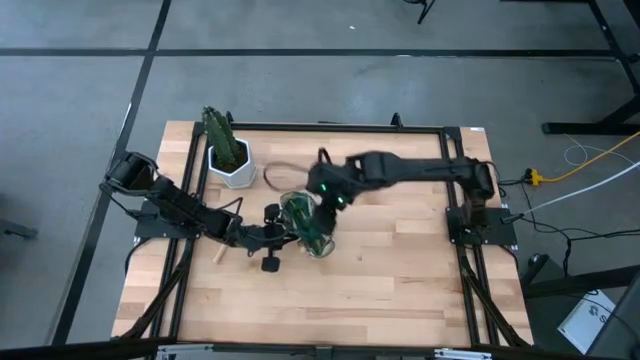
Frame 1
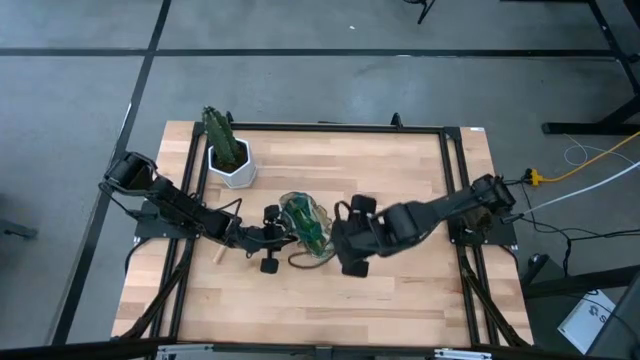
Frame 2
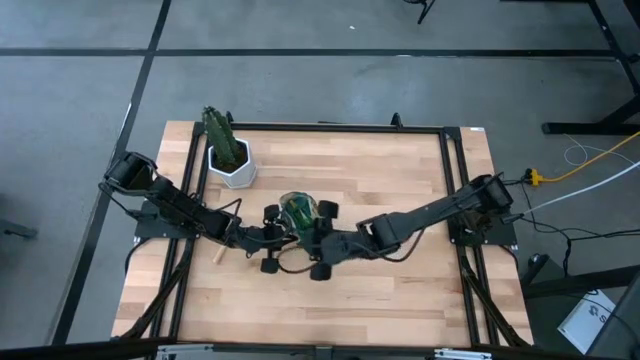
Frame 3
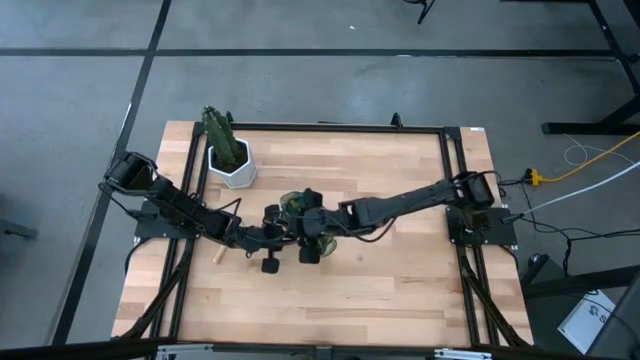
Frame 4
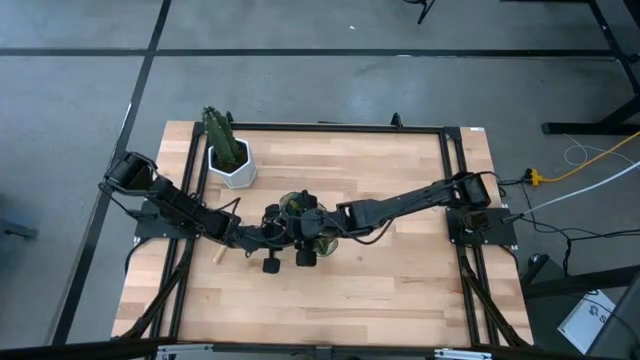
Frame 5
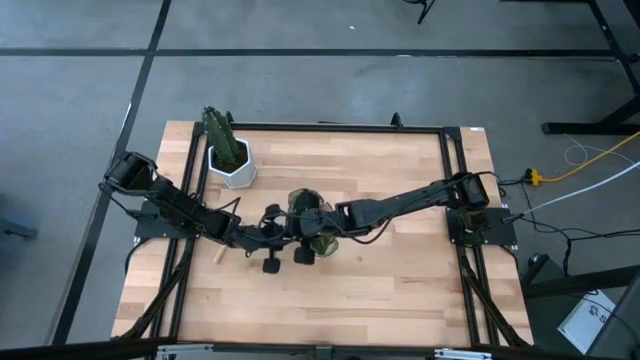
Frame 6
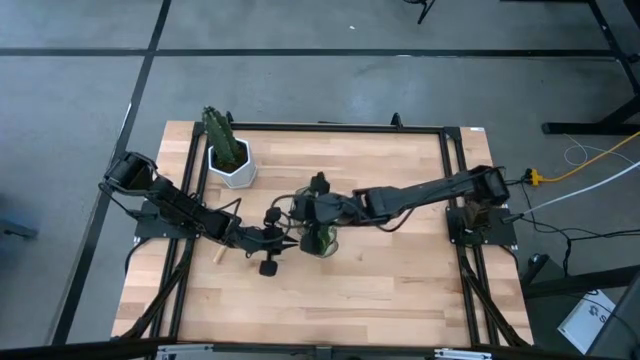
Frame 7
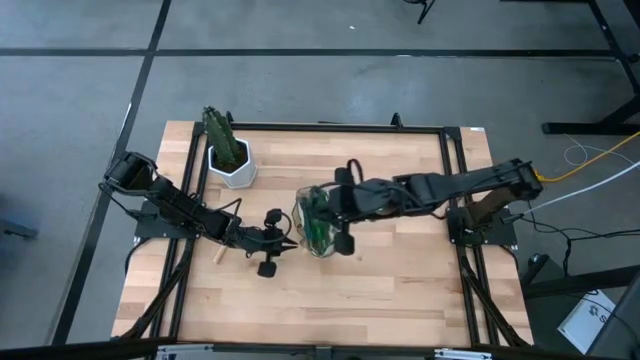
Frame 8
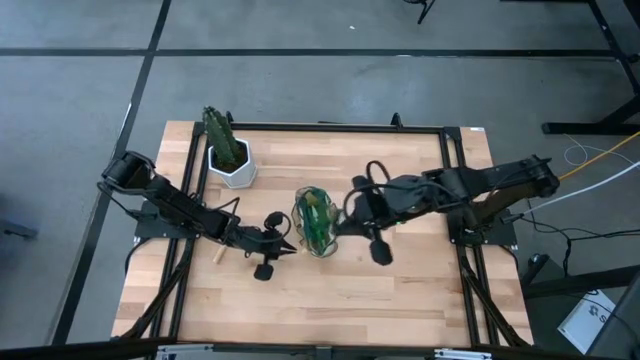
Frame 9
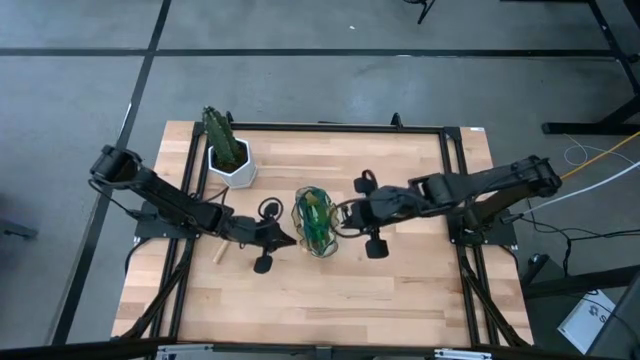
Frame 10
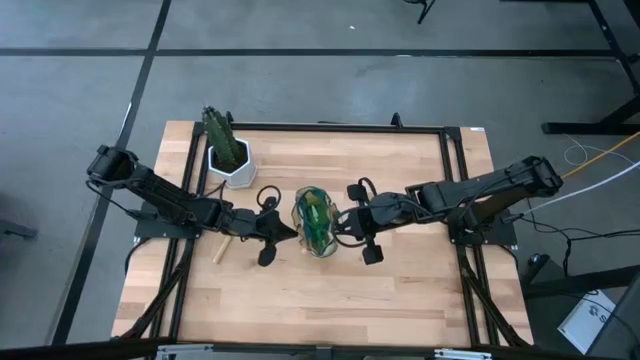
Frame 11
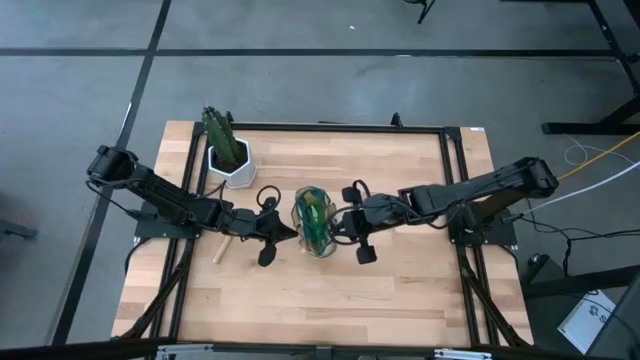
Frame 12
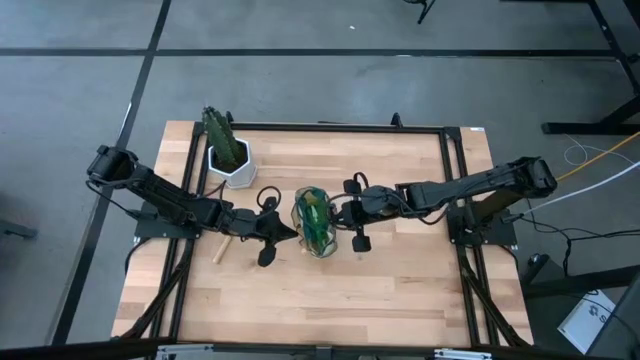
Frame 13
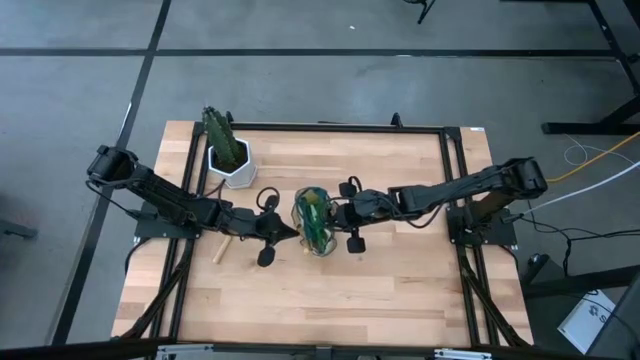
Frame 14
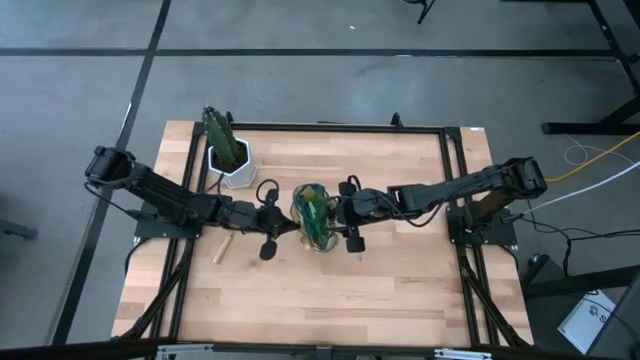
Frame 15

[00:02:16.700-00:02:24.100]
Task: Pick & Place Garden tools in Gardening bag
Put the fruit pruner into the gardening bag

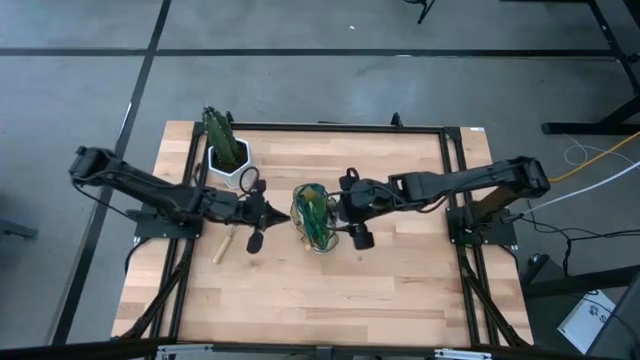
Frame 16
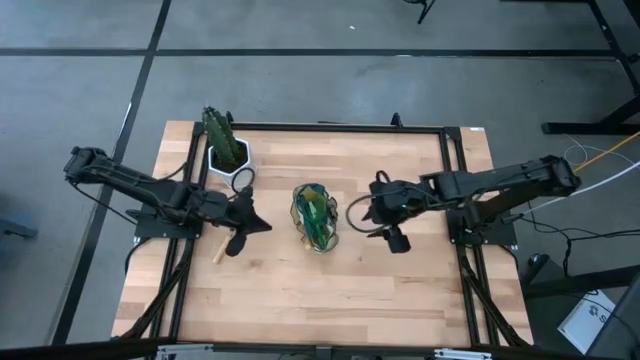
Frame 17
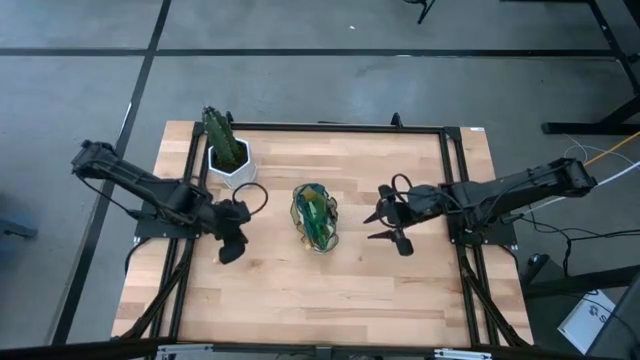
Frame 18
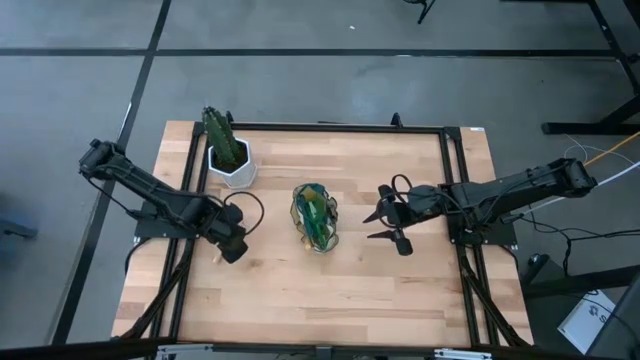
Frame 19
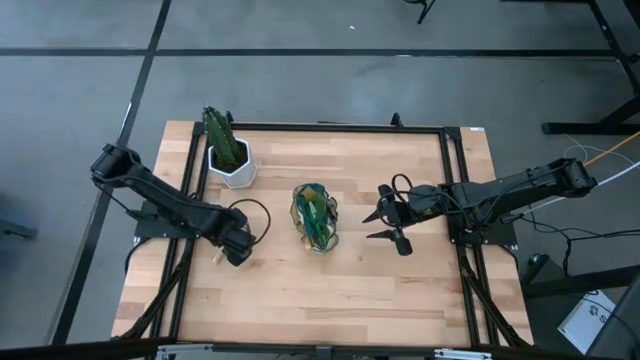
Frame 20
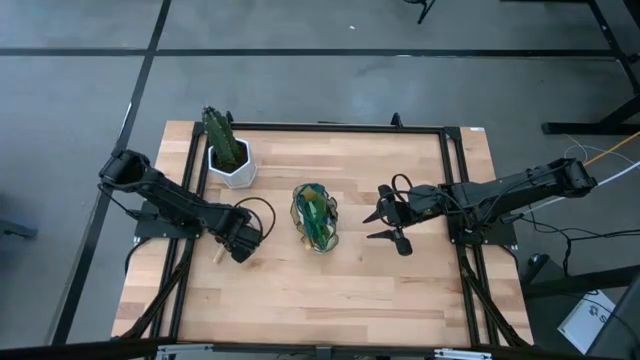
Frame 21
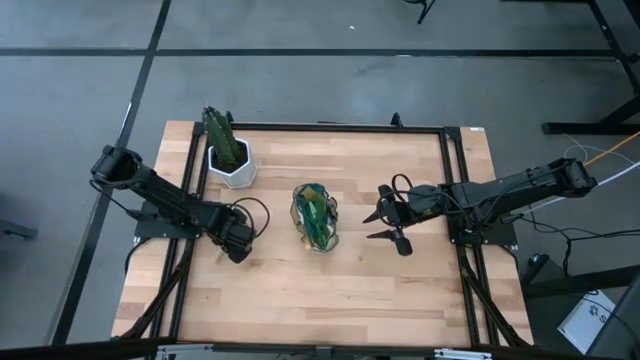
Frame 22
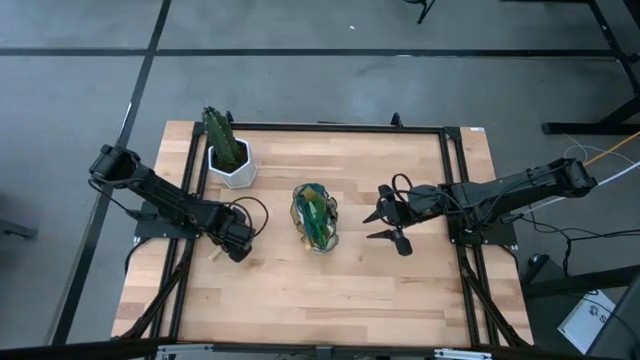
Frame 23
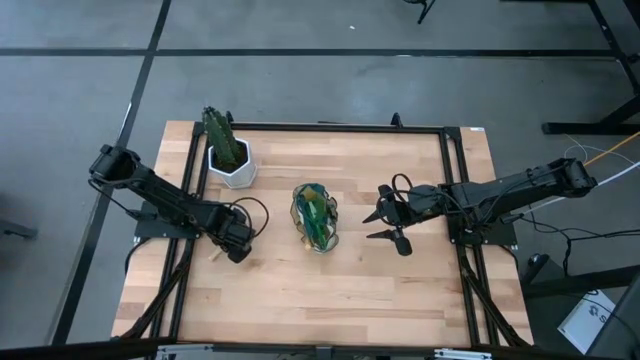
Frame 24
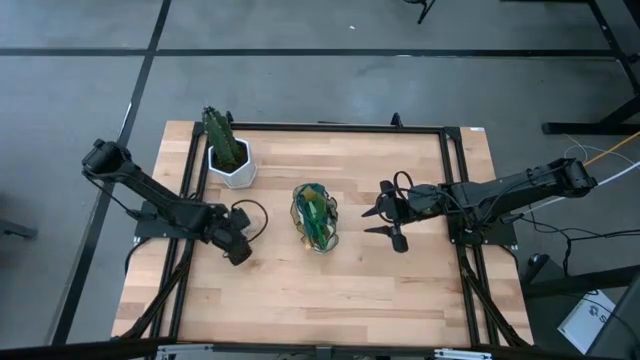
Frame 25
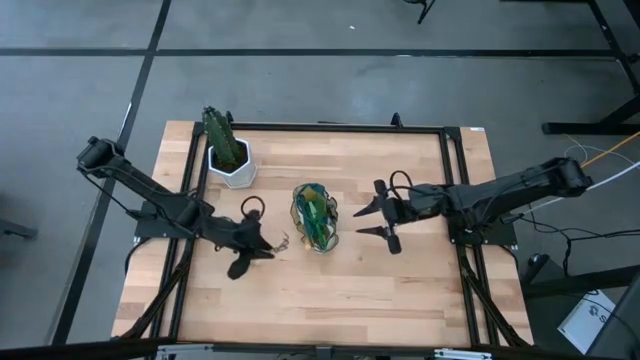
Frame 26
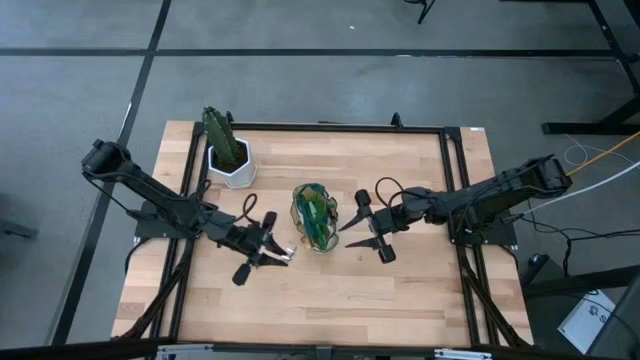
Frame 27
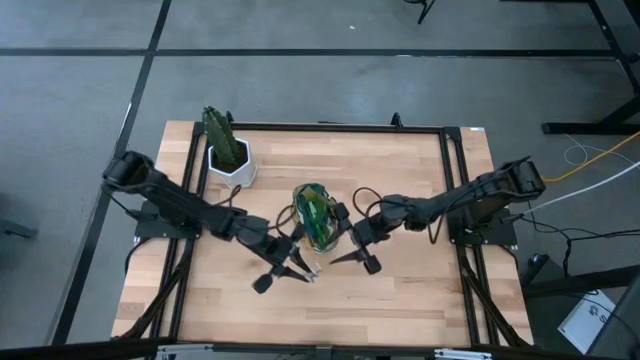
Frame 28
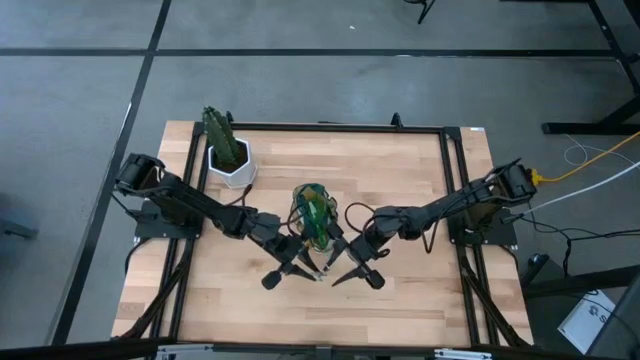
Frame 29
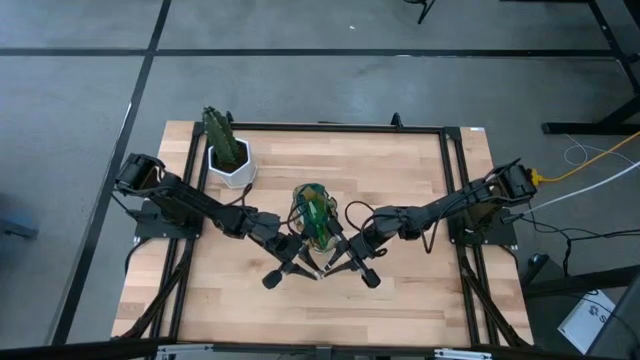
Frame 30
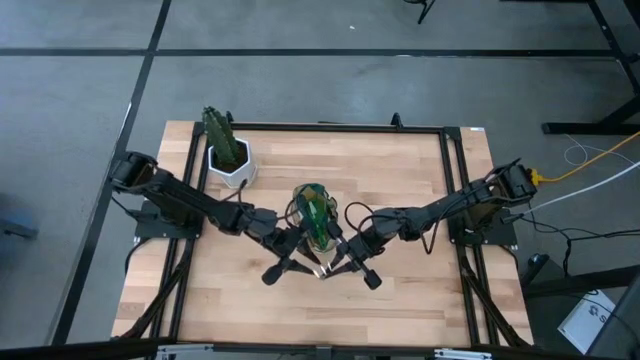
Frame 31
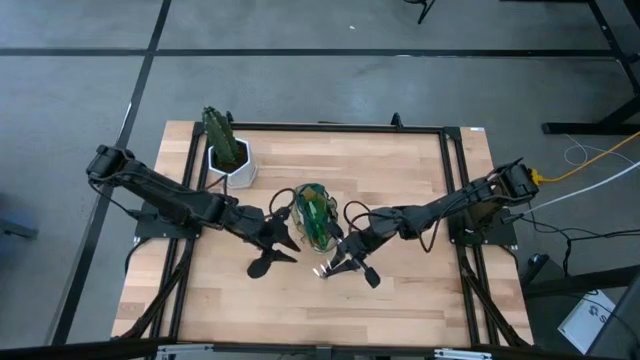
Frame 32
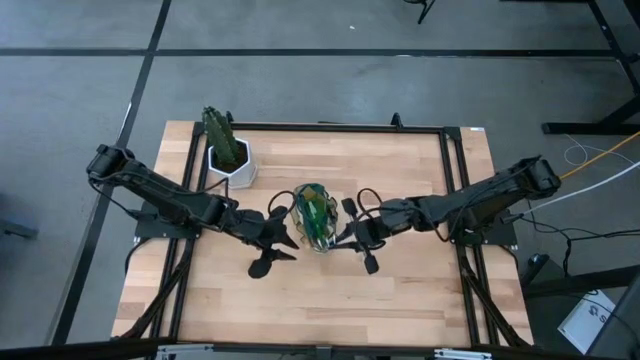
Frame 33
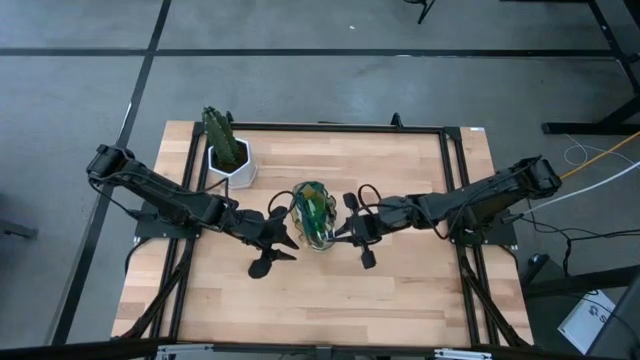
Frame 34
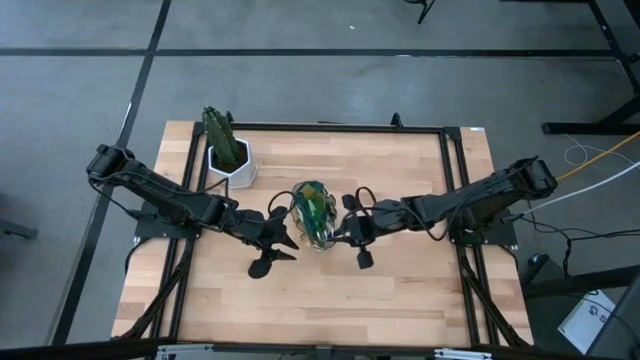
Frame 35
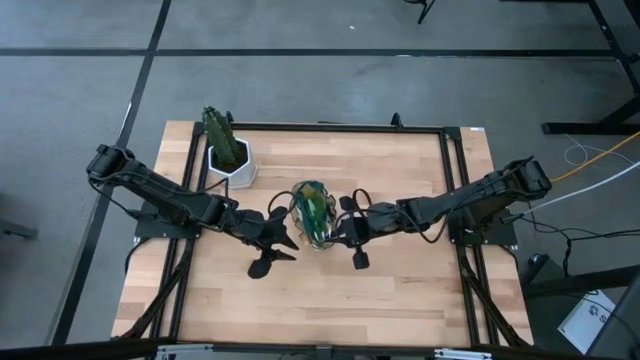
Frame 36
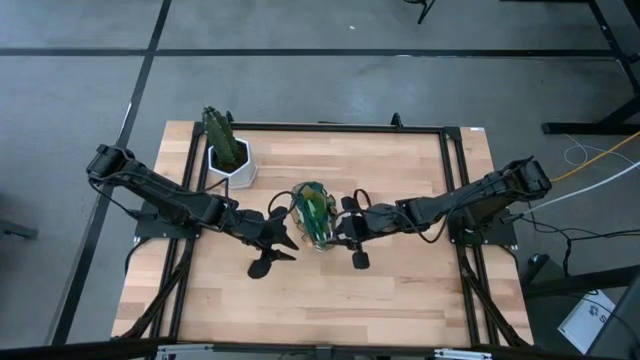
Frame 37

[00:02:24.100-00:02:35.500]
Put the hand rake into the gardening bag

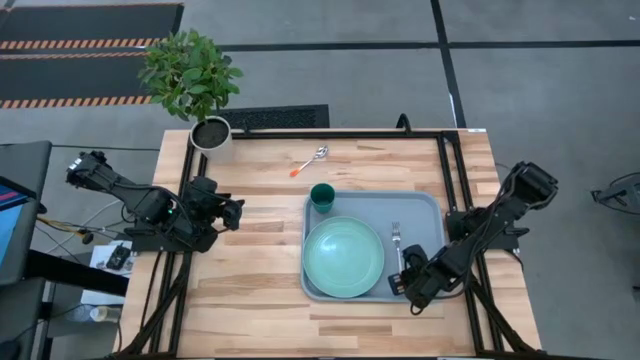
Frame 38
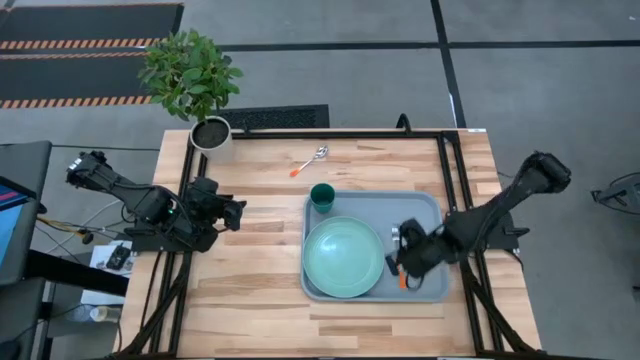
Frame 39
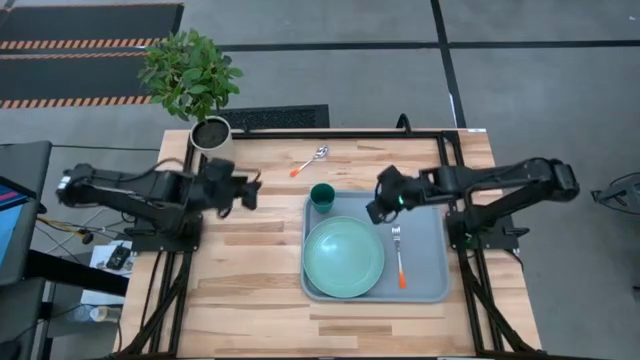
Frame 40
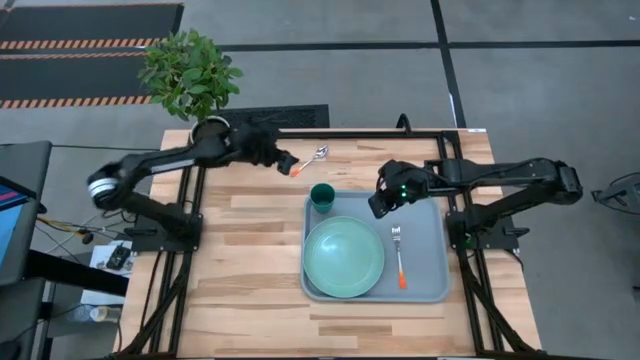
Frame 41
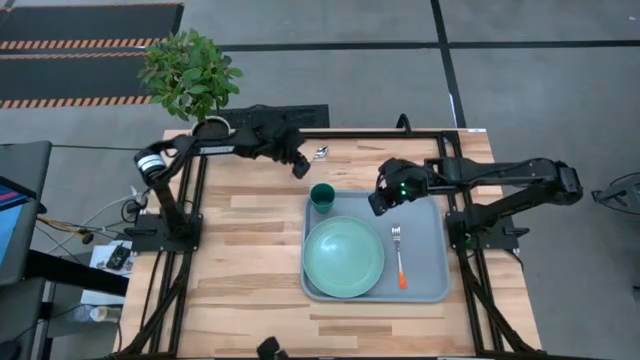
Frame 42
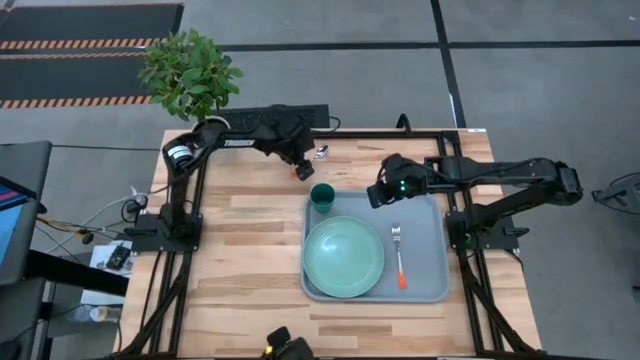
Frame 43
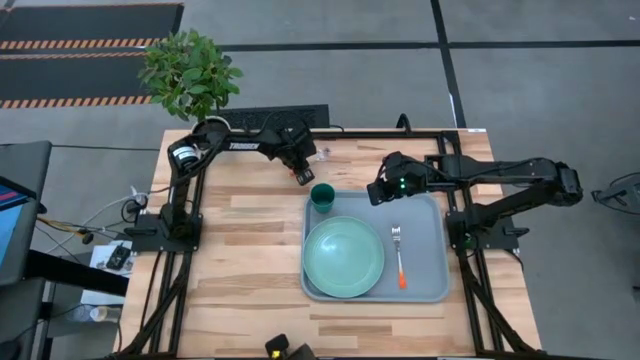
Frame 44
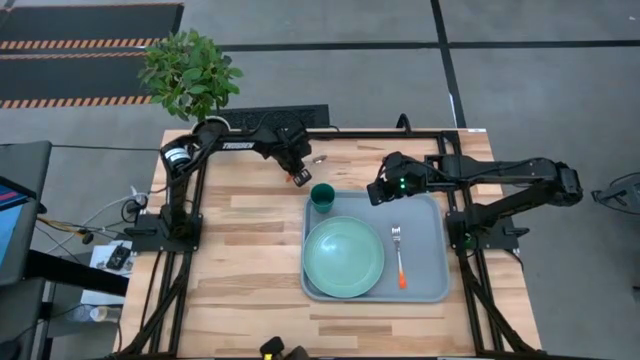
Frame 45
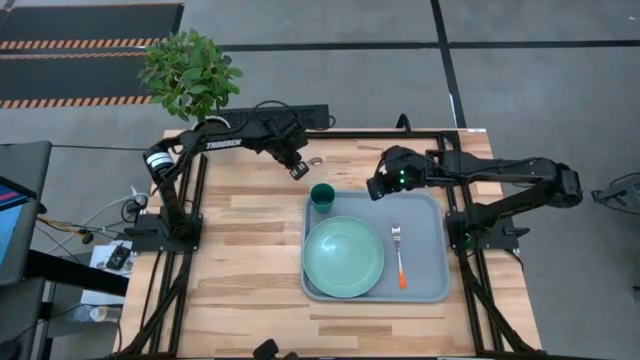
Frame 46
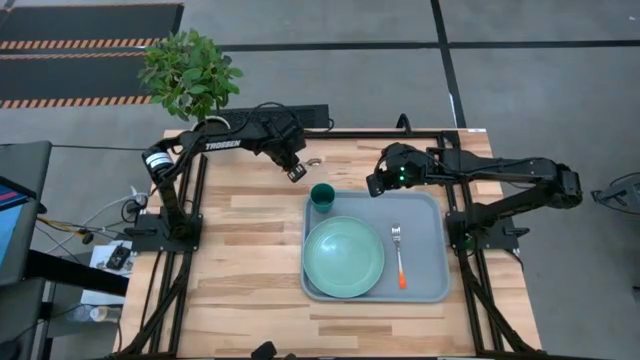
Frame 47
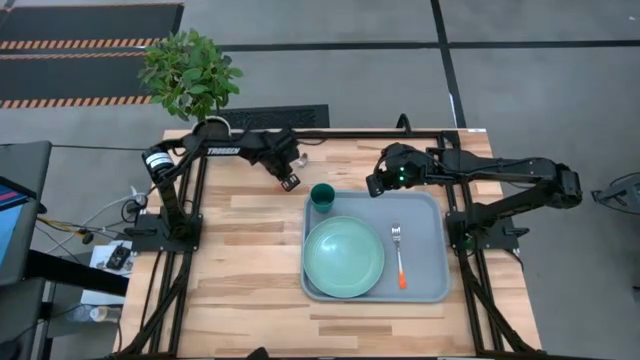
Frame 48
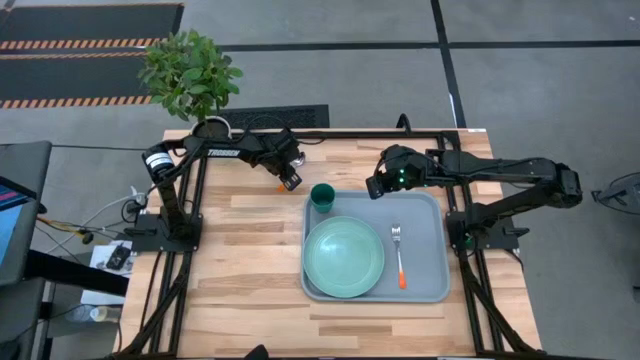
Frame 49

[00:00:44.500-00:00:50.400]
Task: Pick and place plate/cup/fork/spoon on tray
Put the orange spoon on the blue tray to the right of the orange fork
